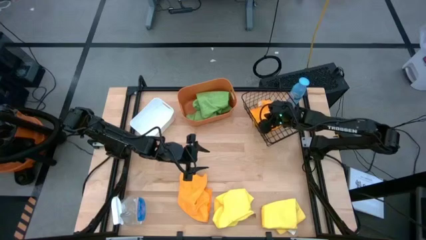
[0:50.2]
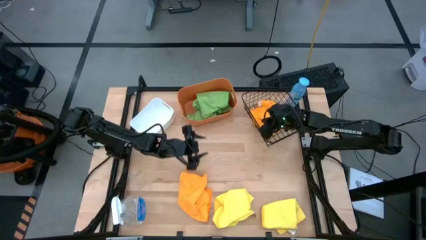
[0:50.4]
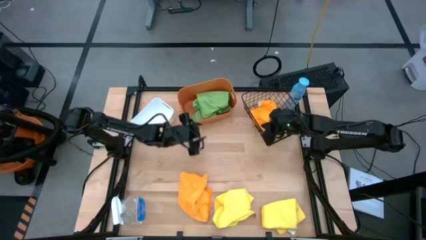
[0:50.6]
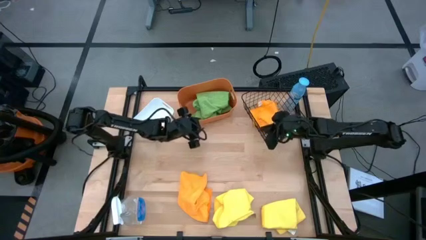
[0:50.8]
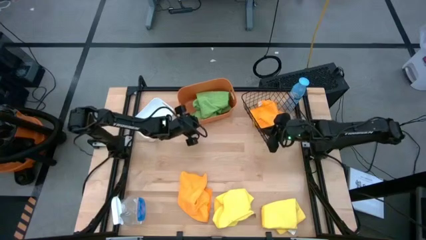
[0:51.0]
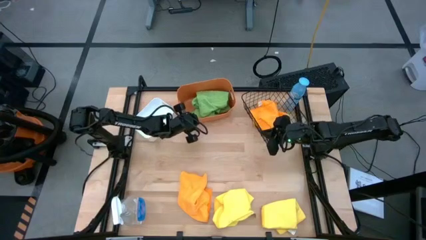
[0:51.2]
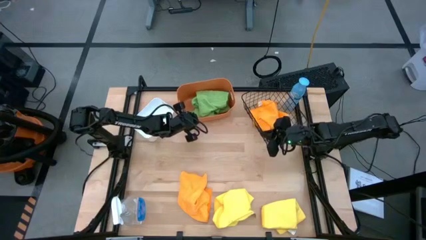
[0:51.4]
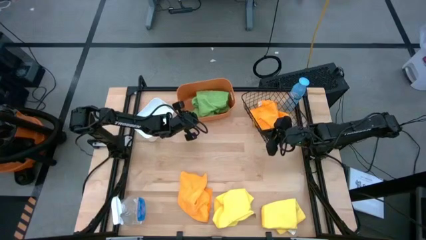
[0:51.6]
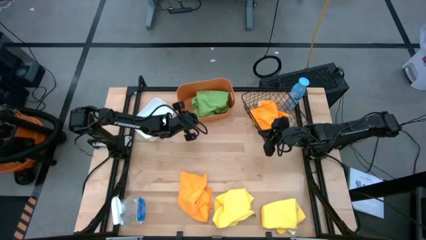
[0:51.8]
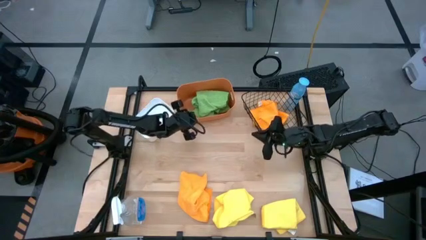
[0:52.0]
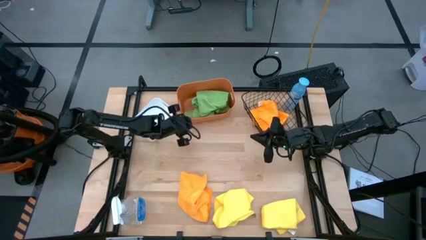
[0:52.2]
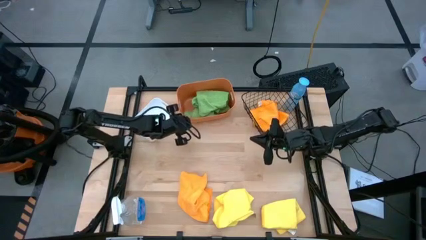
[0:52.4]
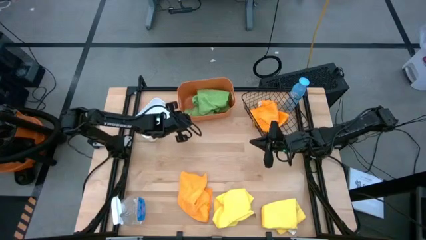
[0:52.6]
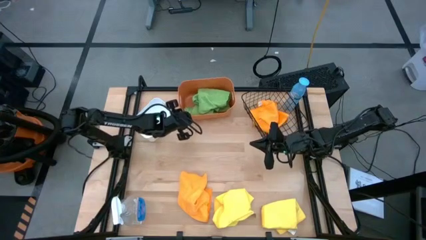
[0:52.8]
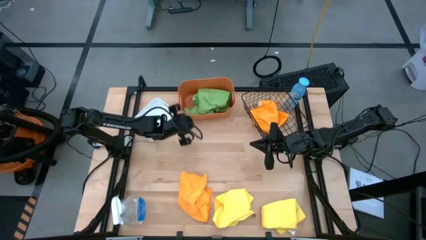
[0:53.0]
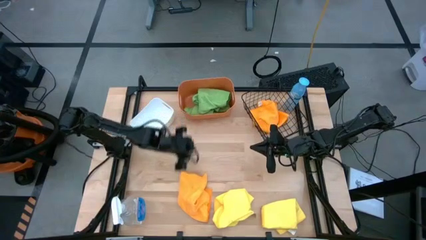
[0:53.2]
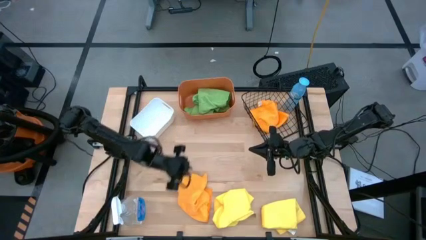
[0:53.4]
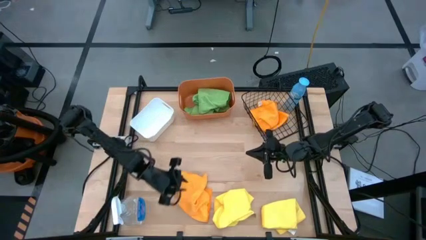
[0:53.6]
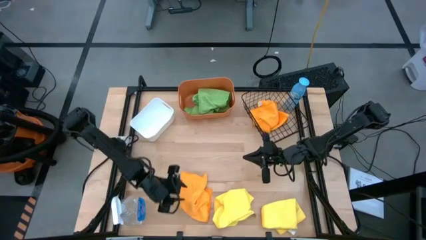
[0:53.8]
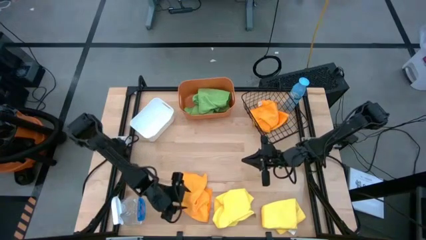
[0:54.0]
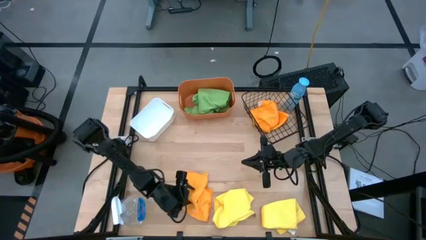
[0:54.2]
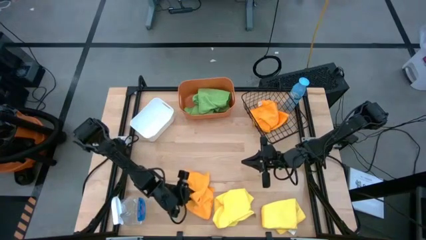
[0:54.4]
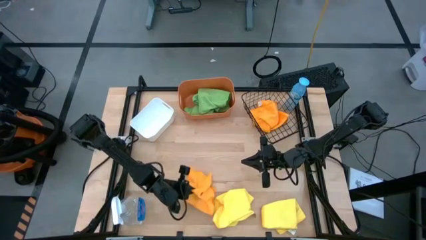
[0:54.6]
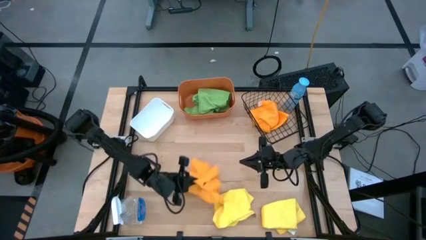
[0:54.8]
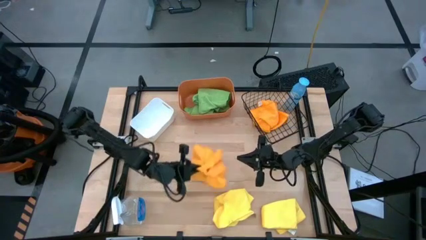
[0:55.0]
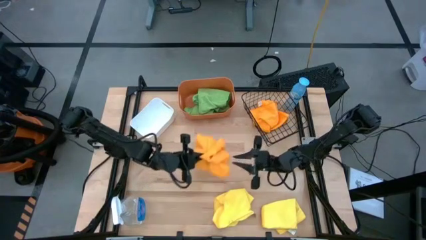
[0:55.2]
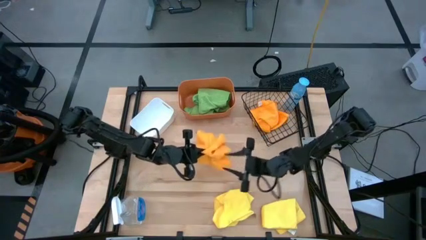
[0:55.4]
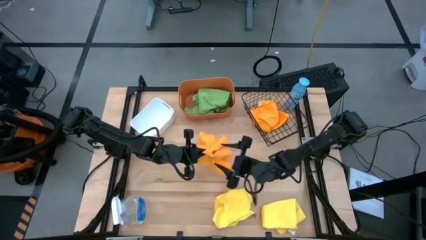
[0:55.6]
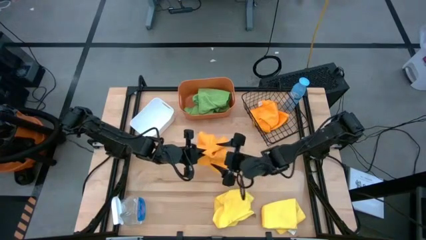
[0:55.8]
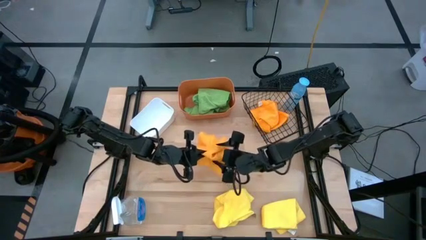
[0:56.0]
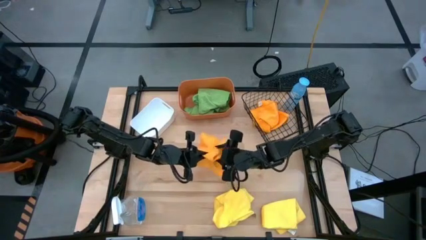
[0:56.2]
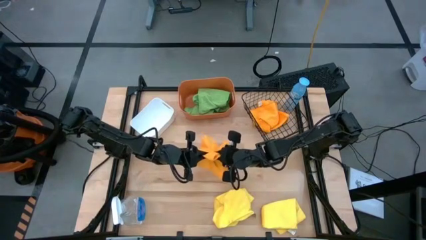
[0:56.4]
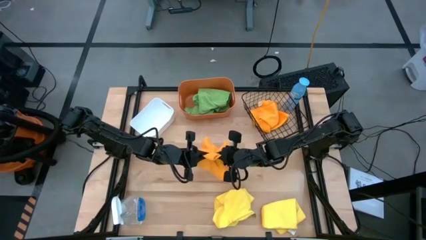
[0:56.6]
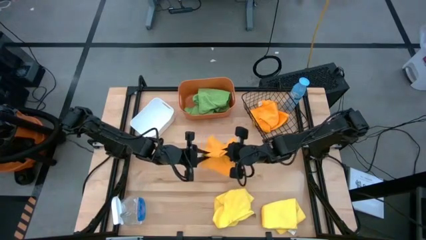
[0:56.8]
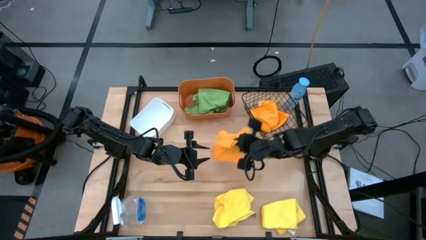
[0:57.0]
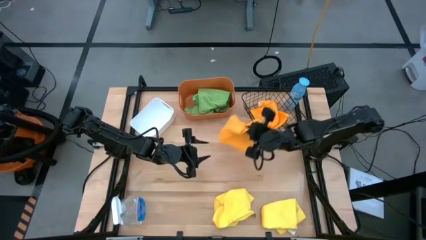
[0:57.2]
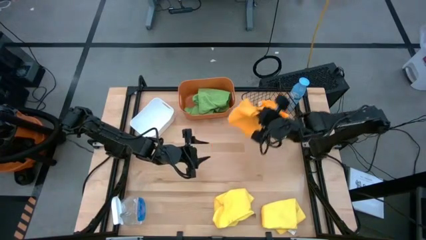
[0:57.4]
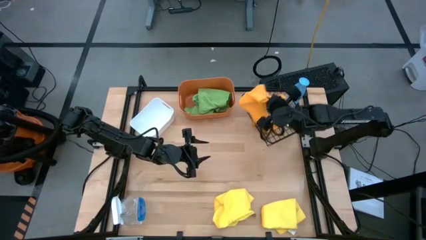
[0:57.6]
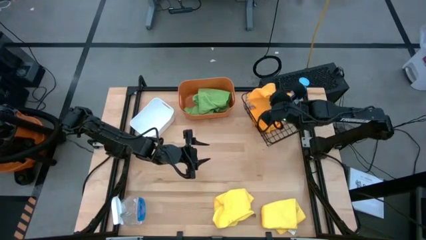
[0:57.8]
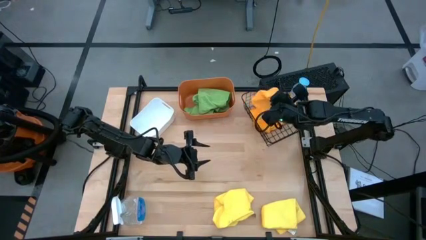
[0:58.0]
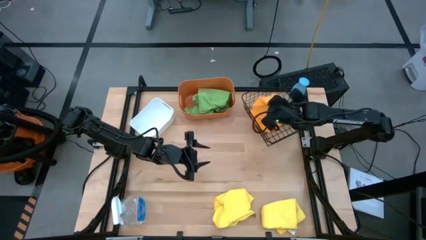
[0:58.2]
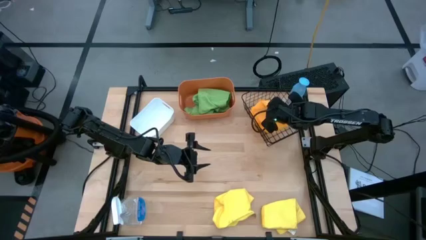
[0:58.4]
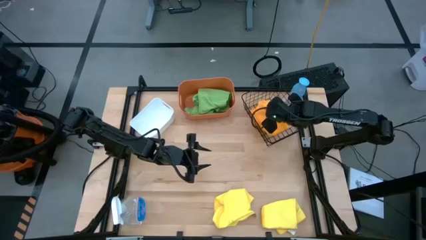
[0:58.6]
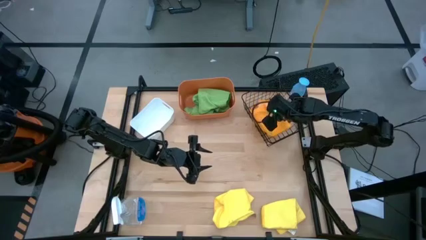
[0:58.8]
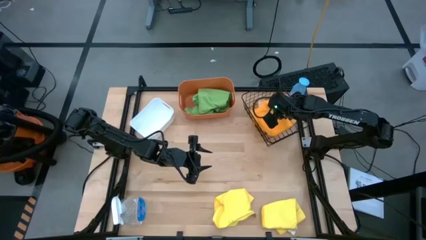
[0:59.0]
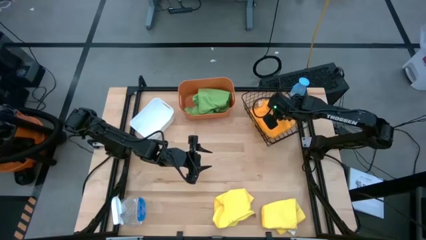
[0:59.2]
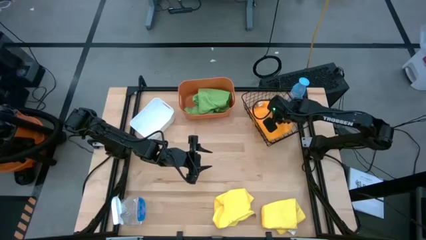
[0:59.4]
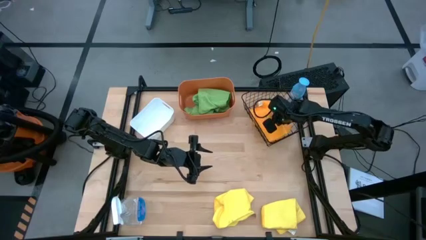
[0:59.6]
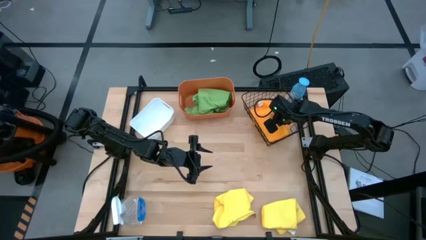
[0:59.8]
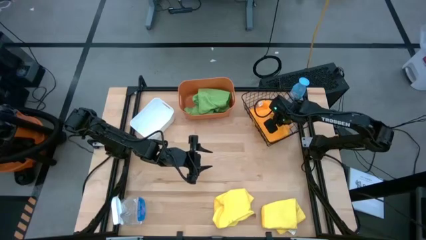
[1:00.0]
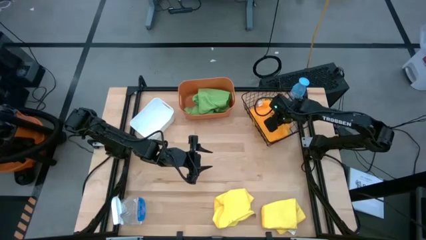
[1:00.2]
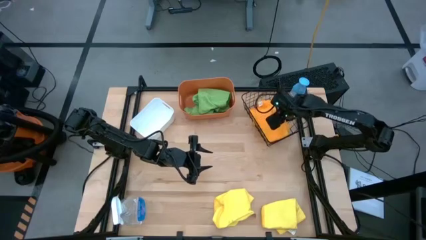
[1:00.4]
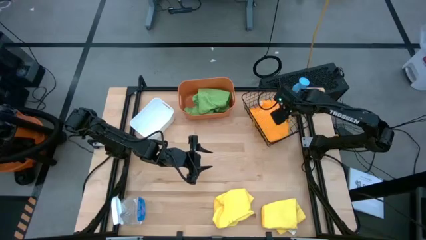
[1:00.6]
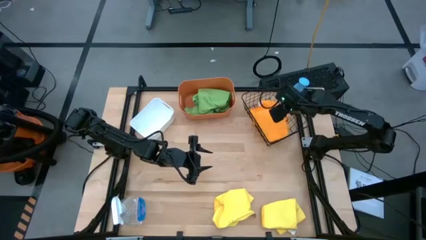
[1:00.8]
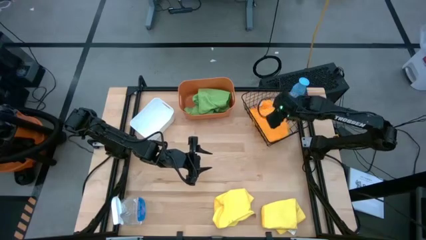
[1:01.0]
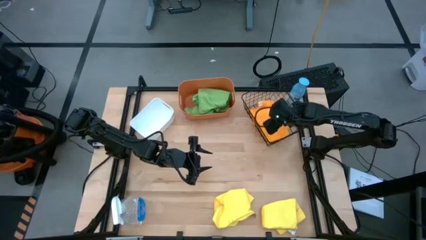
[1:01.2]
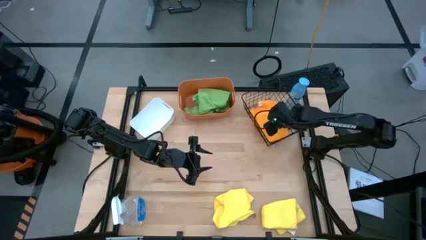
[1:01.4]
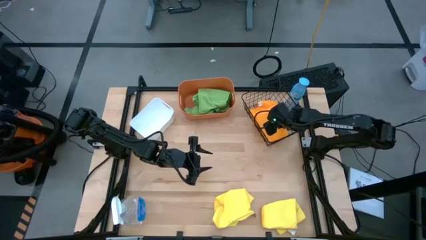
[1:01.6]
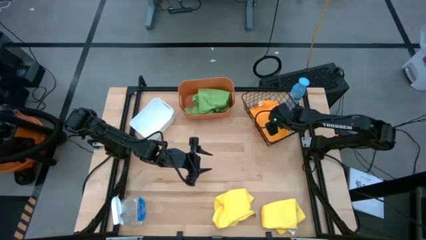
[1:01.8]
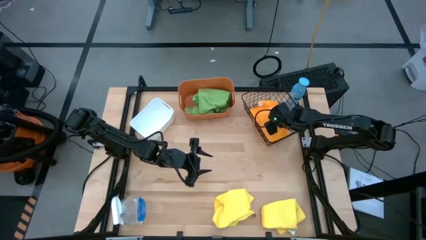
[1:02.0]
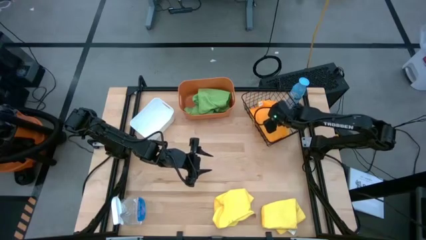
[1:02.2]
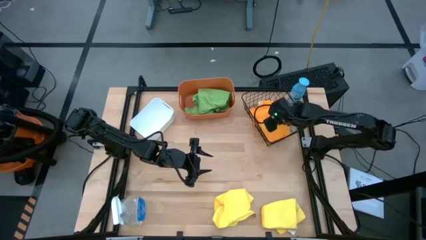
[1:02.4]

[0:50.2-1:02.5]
Task: Sort microfiber towel by color & place in baskets
Put the orange towel into the wire basket
